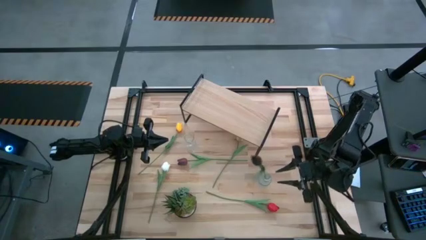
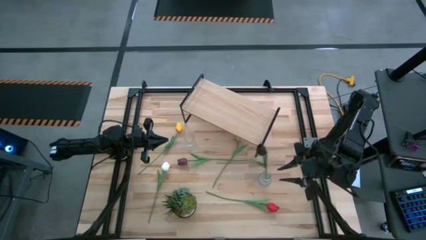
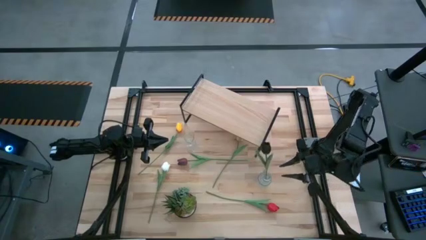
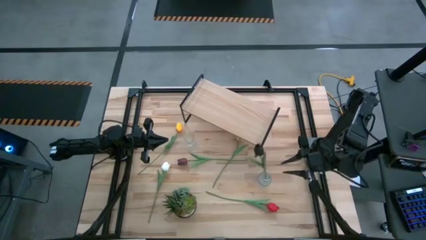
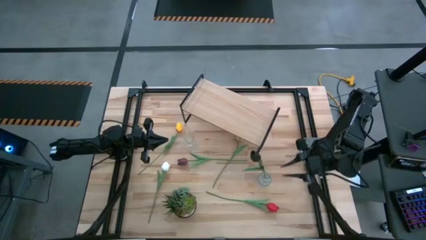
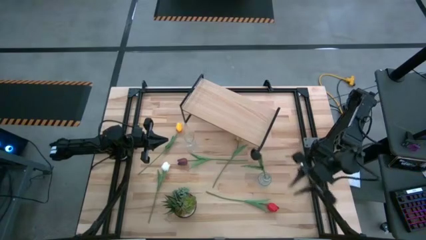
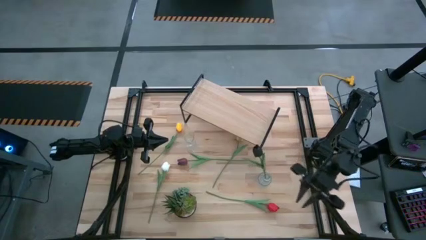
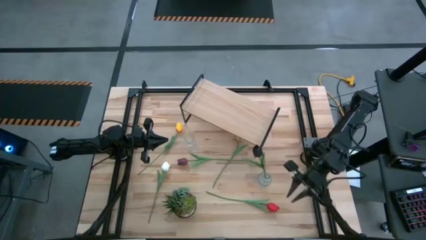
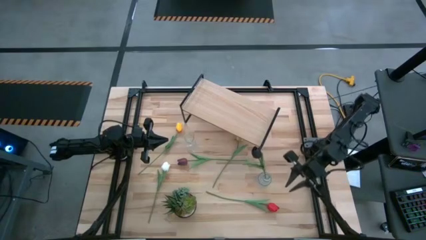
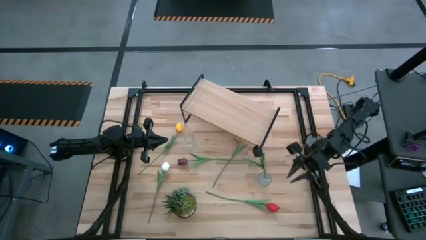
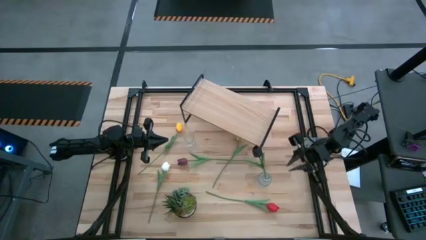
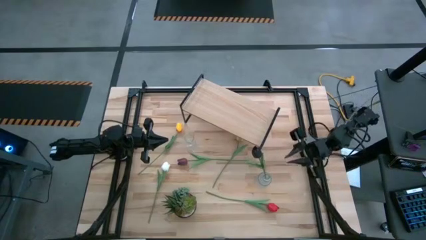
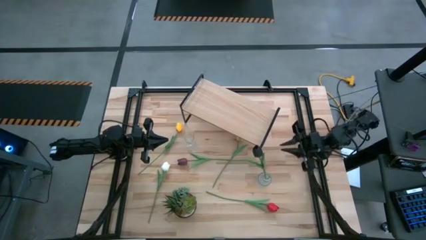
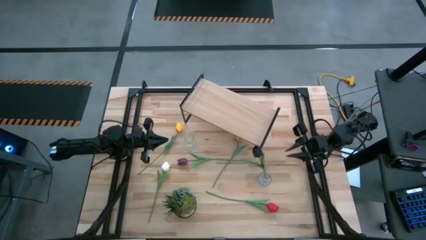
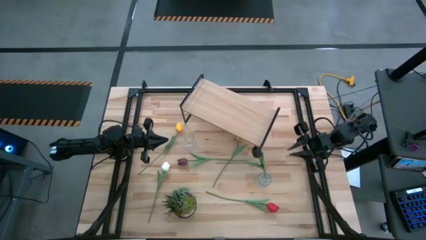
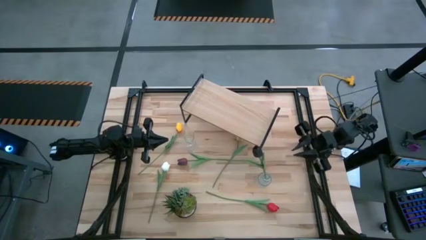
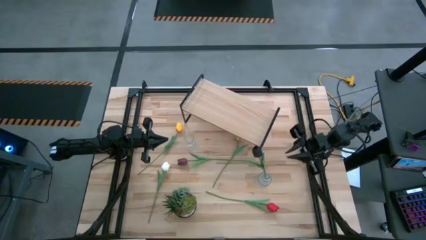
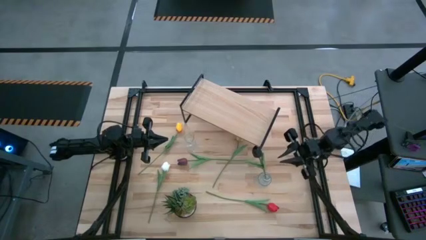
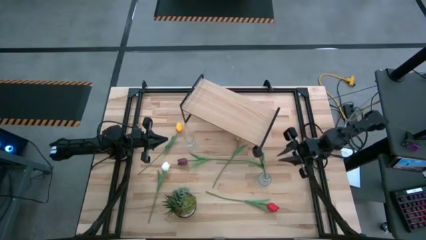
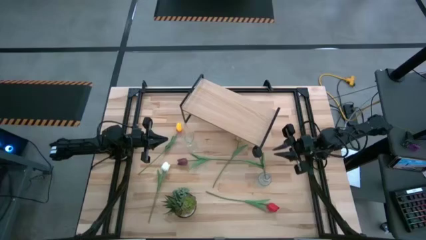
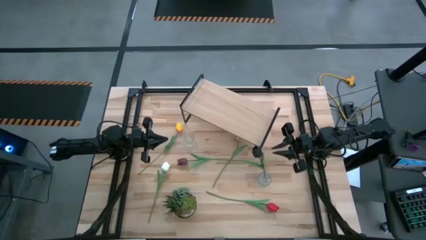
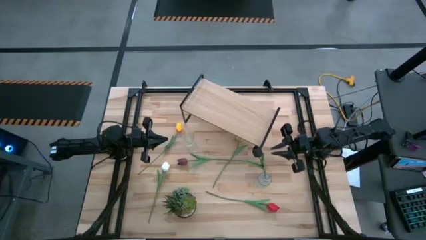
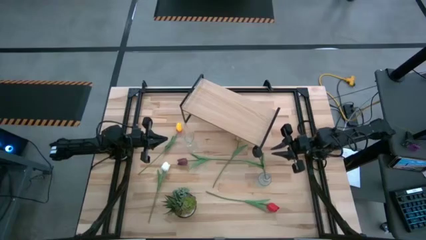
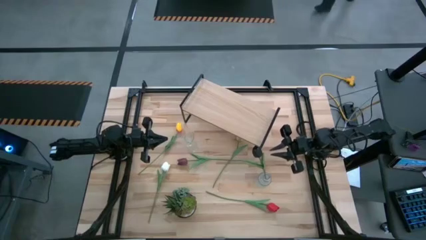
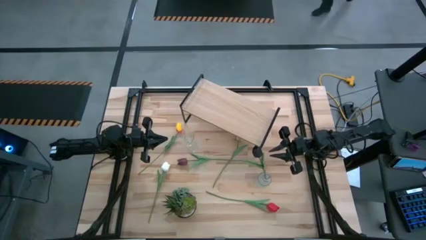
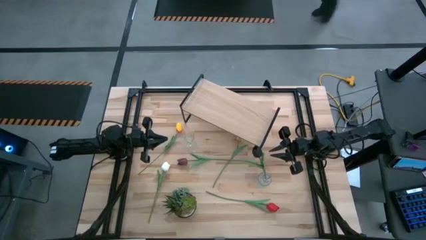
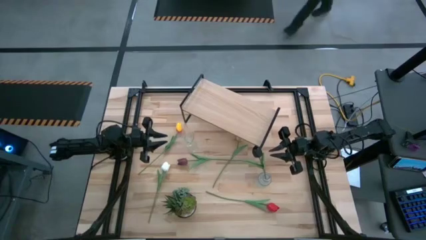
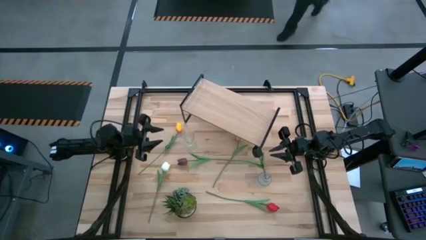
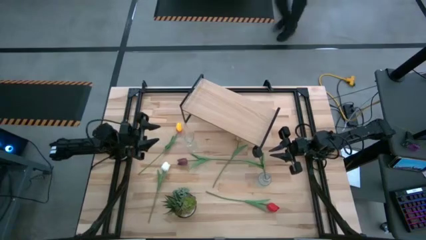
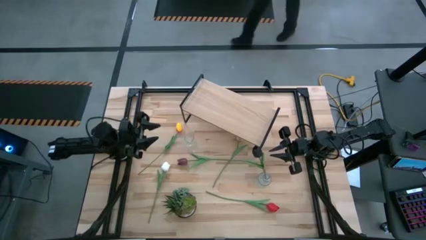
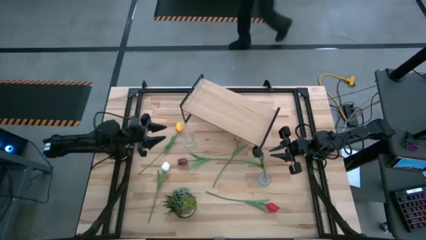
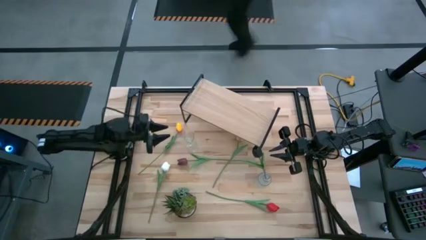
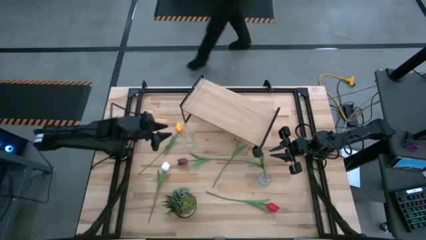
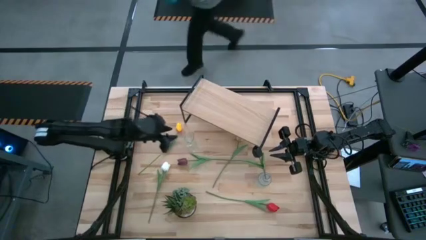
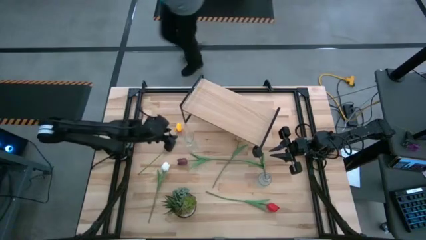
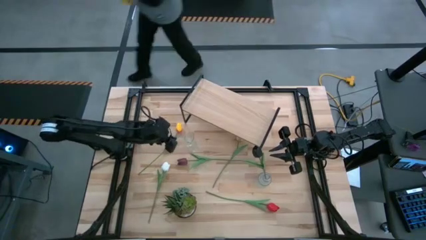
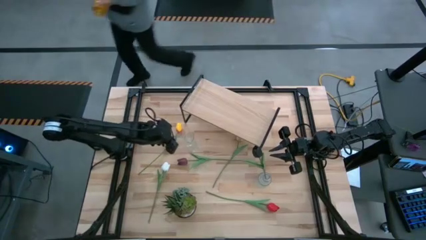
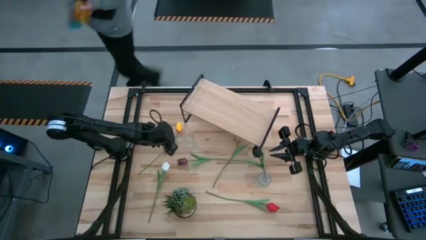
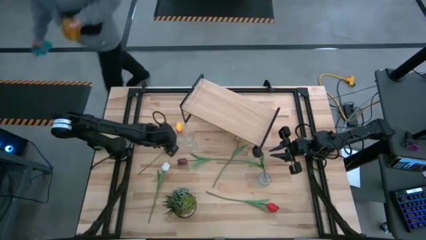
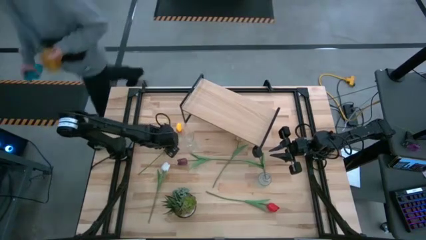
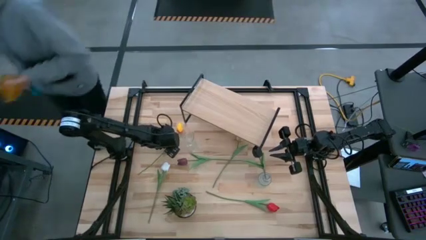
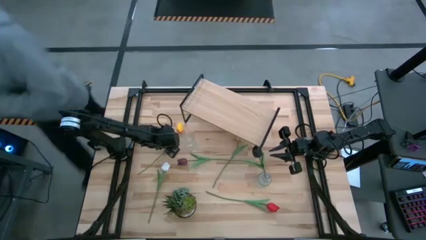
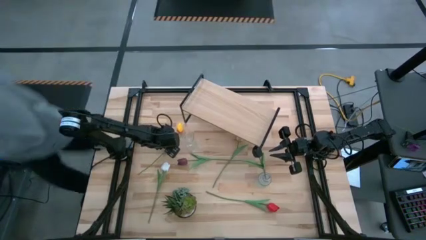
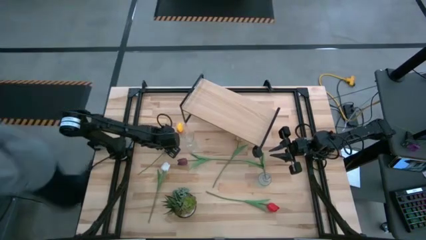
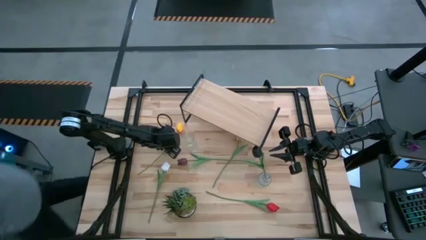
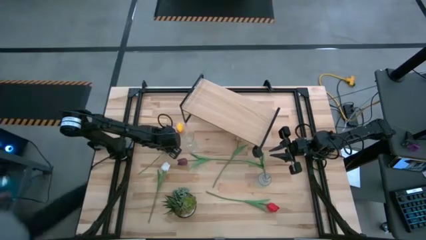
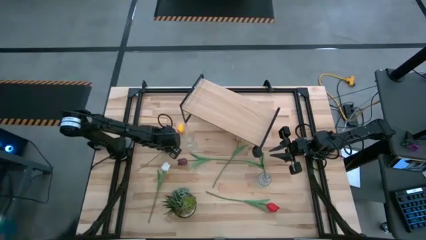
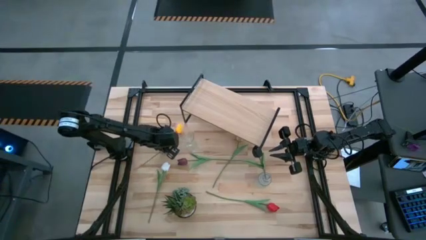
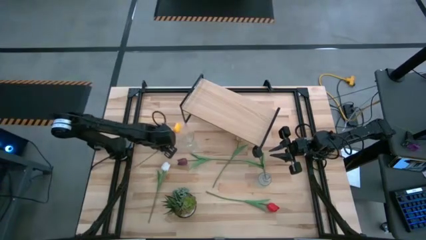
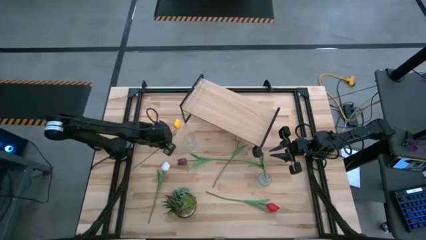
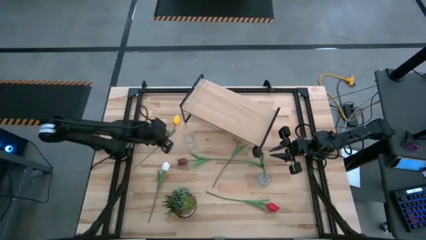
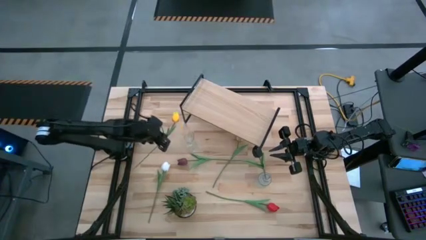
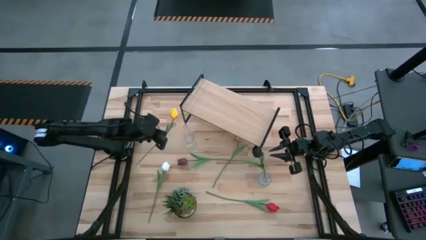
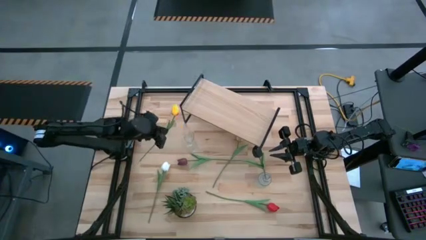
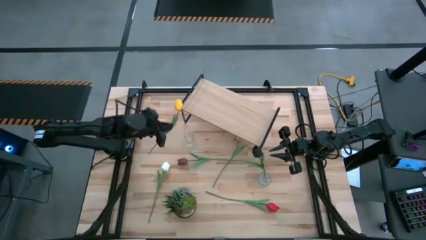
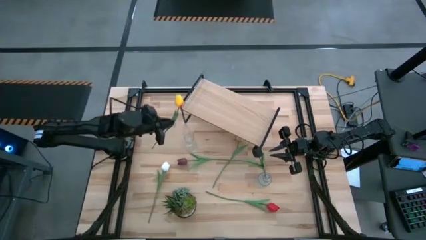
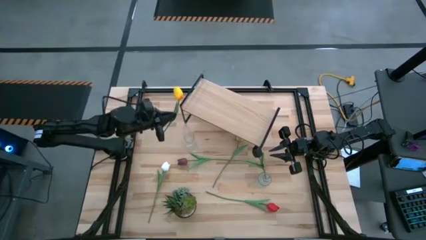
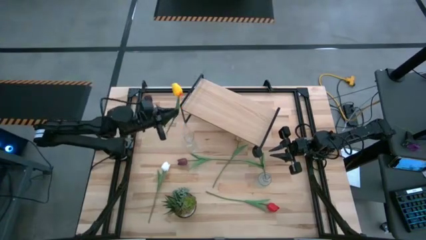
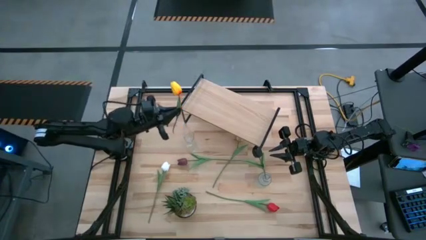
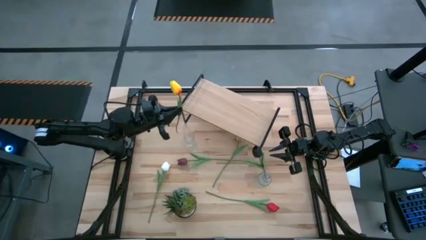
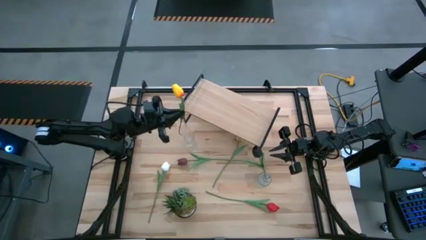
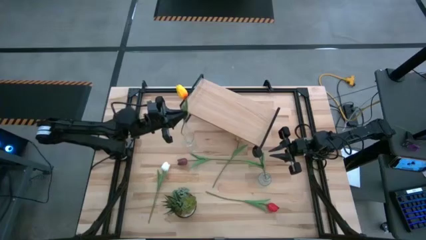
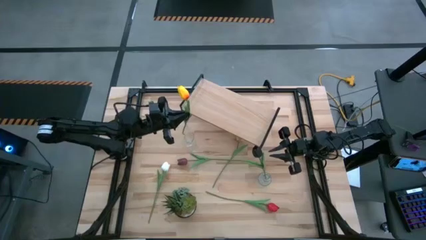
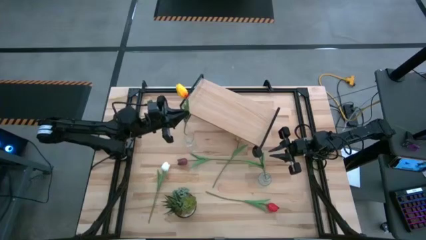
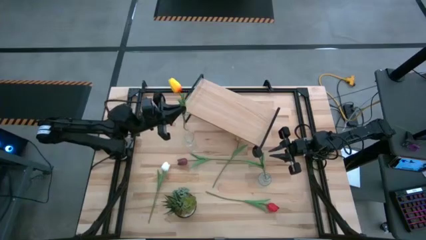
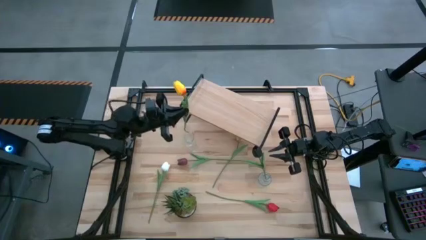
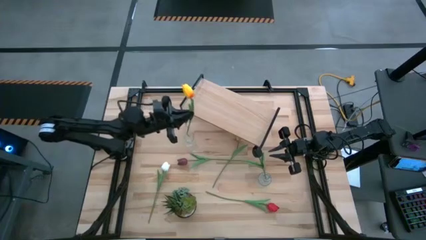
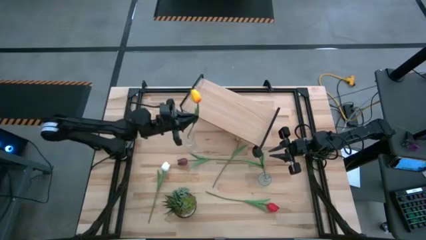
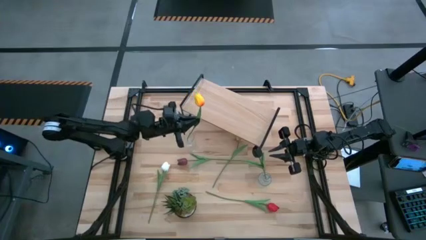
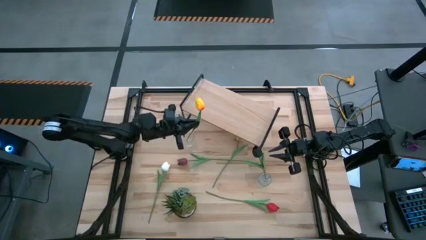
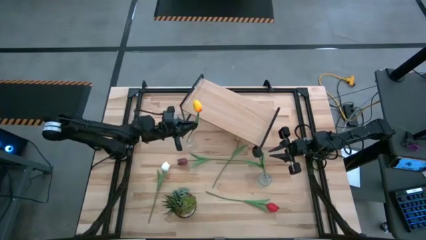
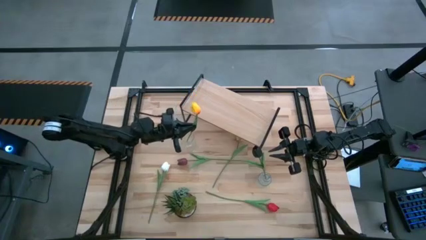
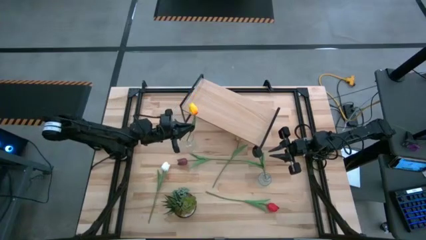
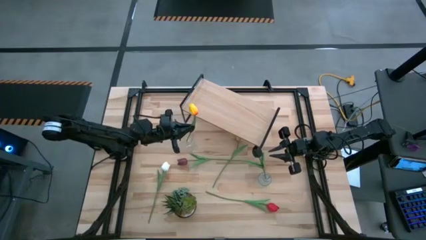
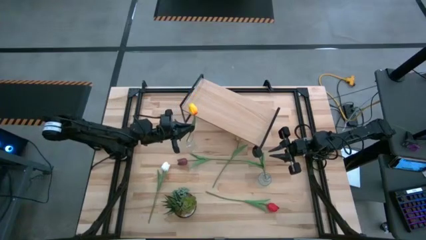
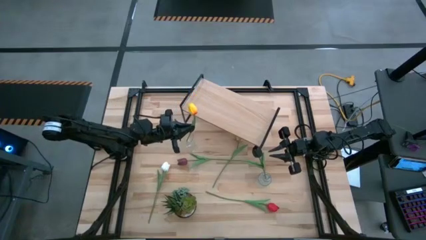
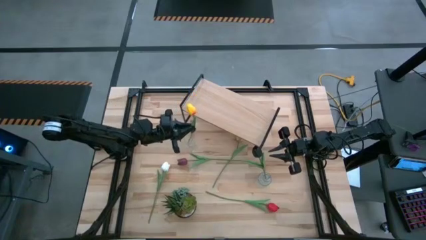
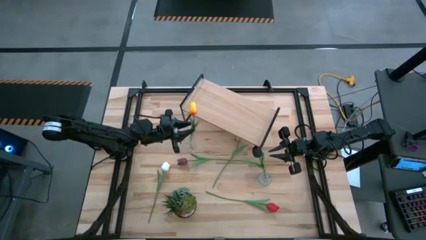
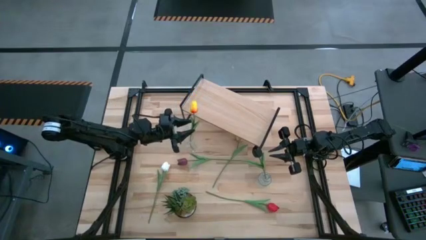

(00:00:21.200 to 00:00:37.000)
Task: Pick and place flowers into a vace then onto a shelf
Put the yellow tulip into the left transparent vase
